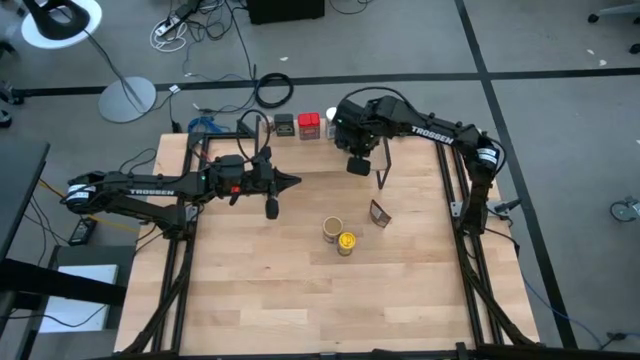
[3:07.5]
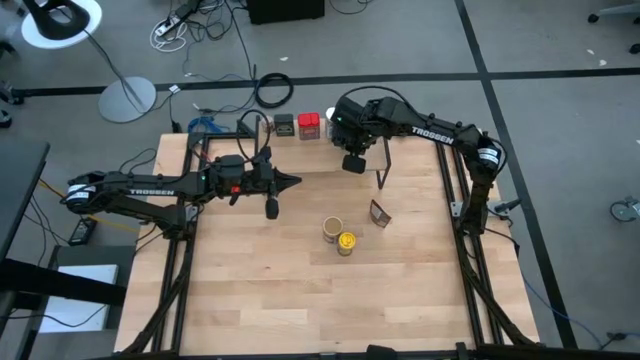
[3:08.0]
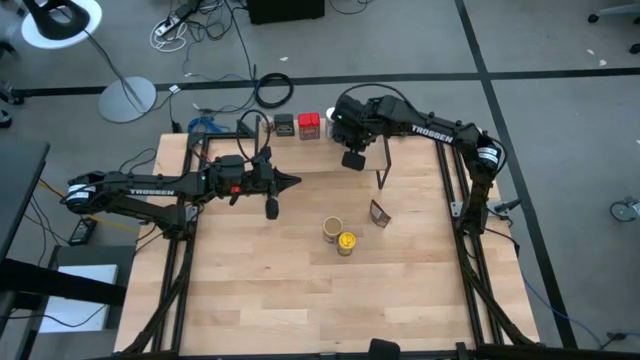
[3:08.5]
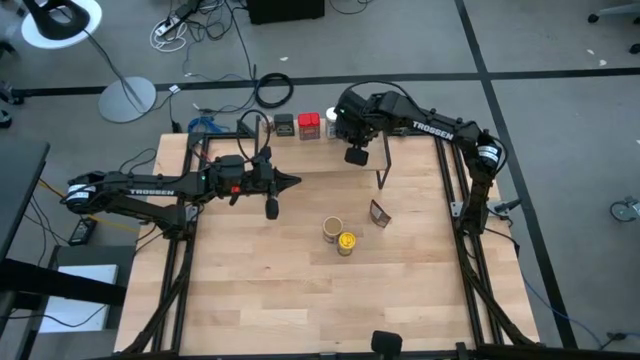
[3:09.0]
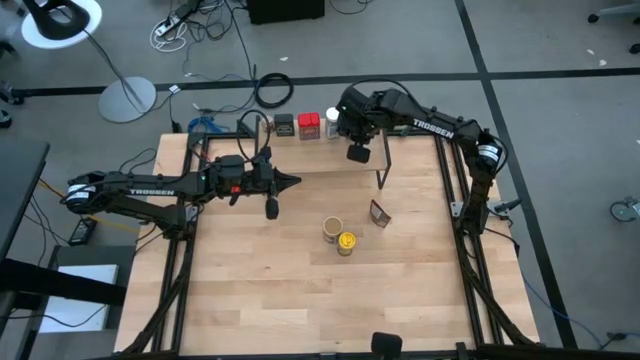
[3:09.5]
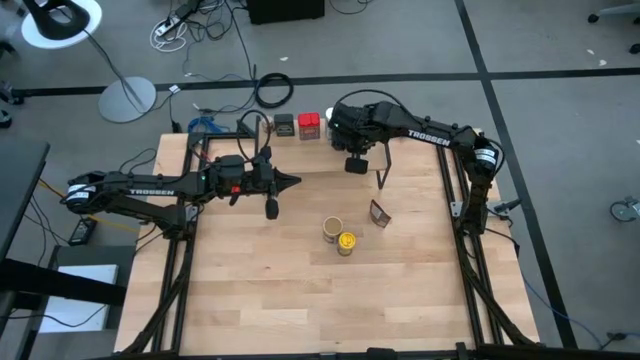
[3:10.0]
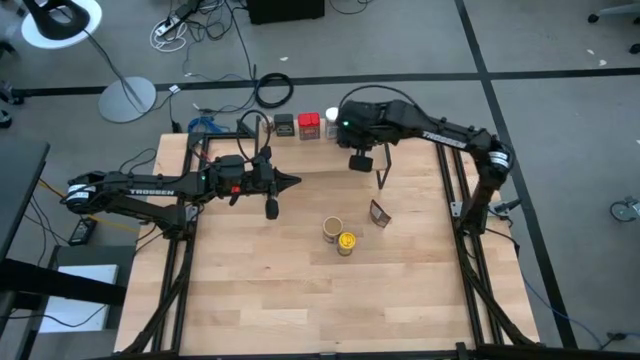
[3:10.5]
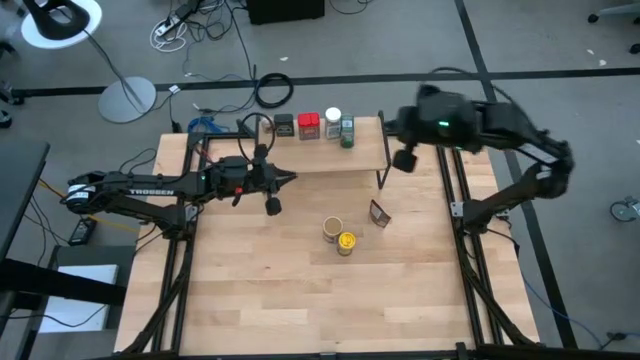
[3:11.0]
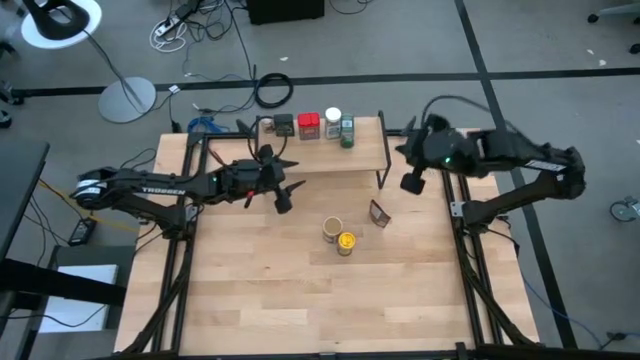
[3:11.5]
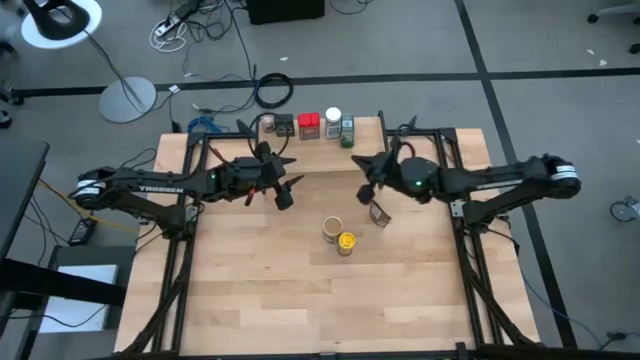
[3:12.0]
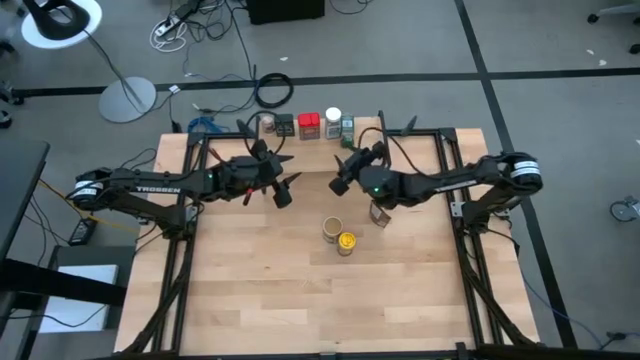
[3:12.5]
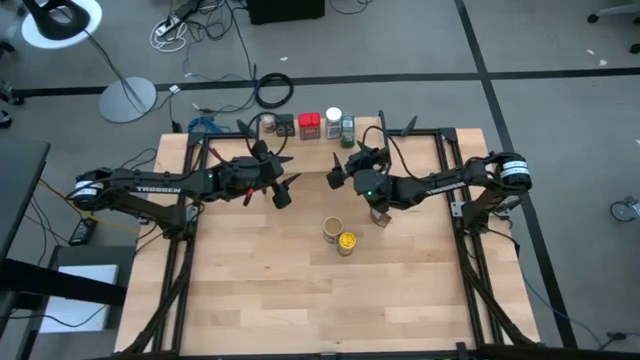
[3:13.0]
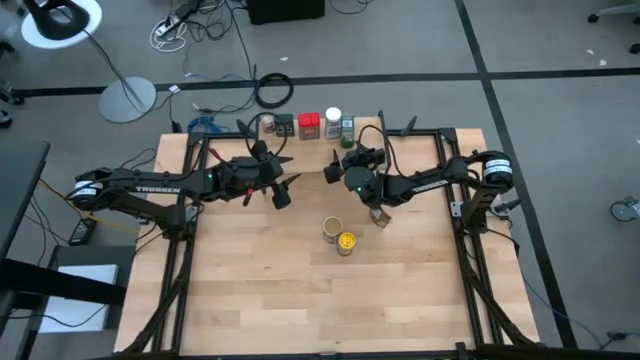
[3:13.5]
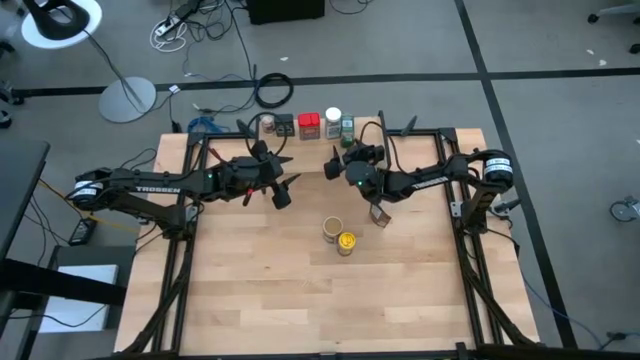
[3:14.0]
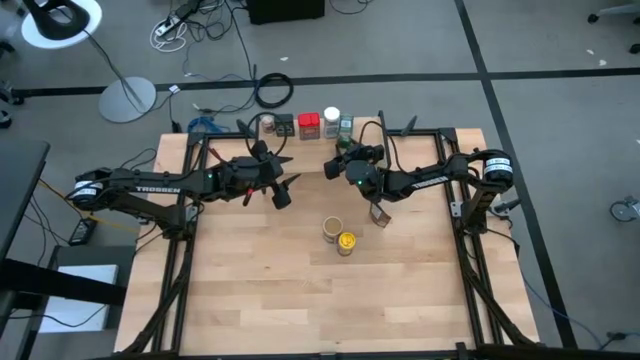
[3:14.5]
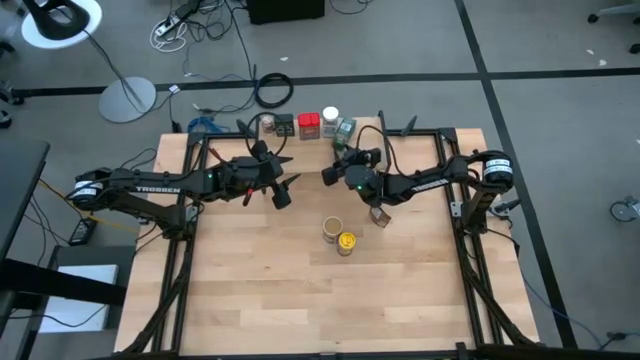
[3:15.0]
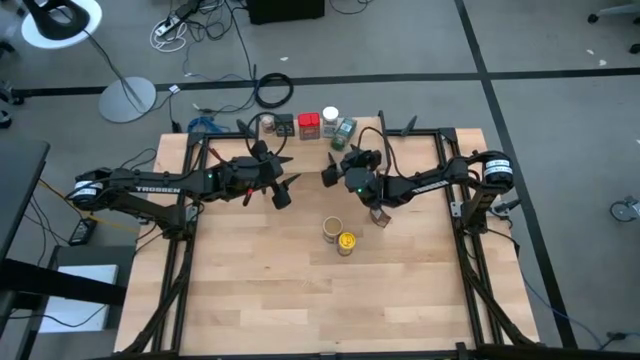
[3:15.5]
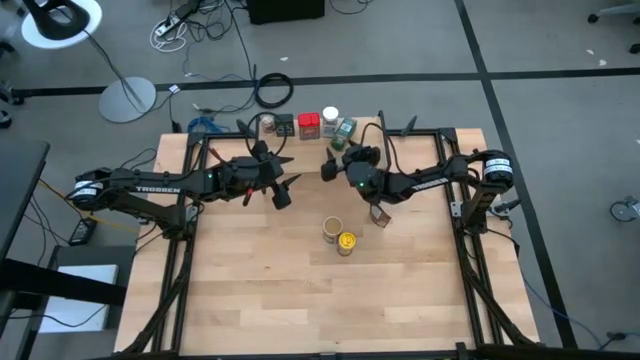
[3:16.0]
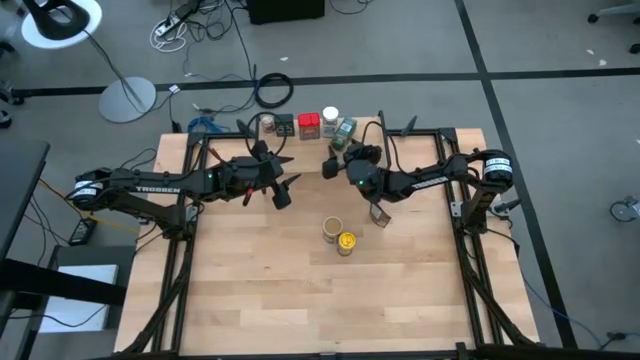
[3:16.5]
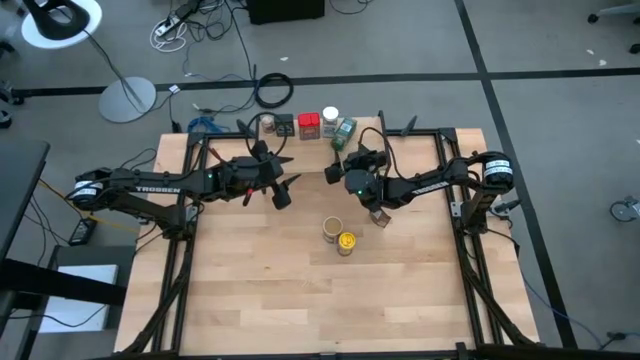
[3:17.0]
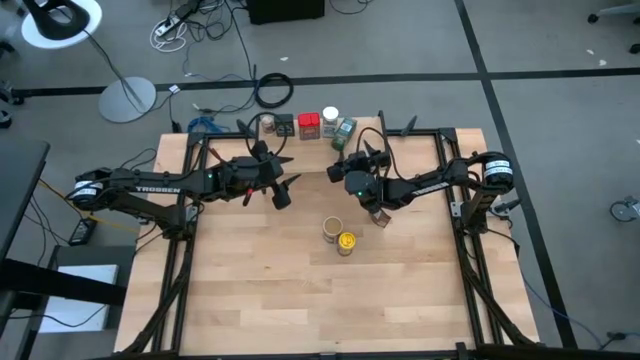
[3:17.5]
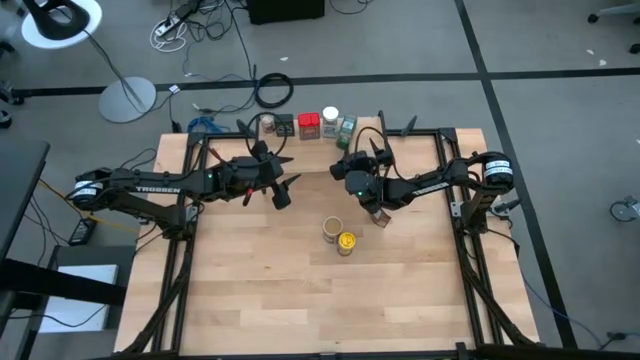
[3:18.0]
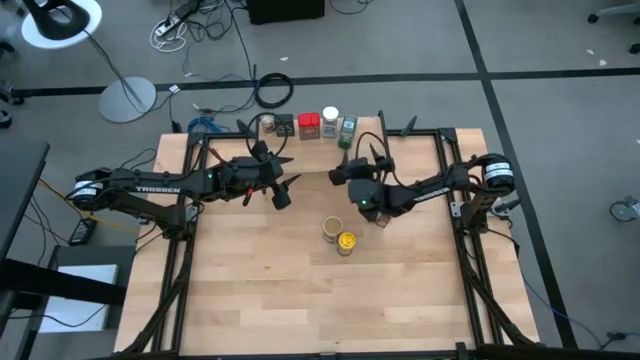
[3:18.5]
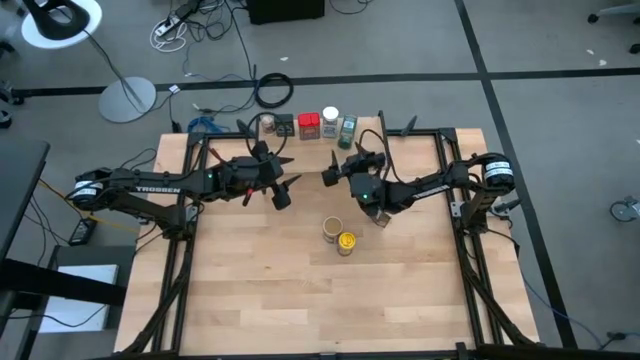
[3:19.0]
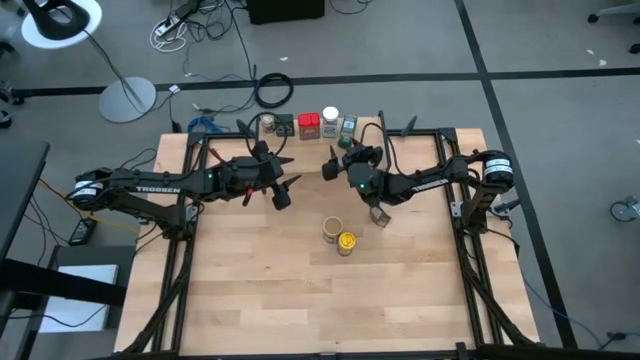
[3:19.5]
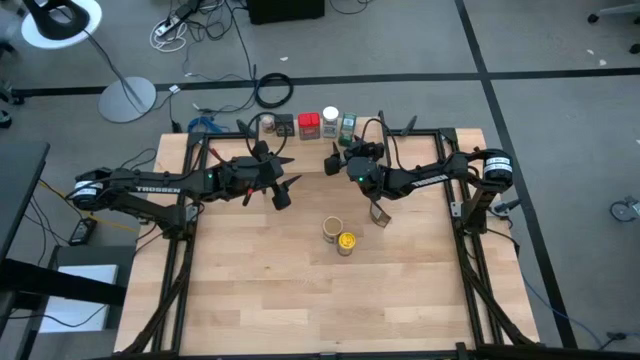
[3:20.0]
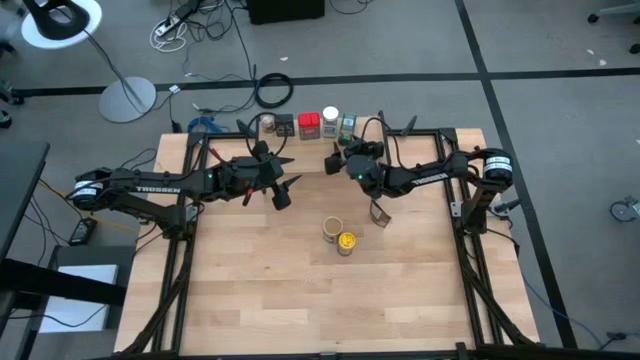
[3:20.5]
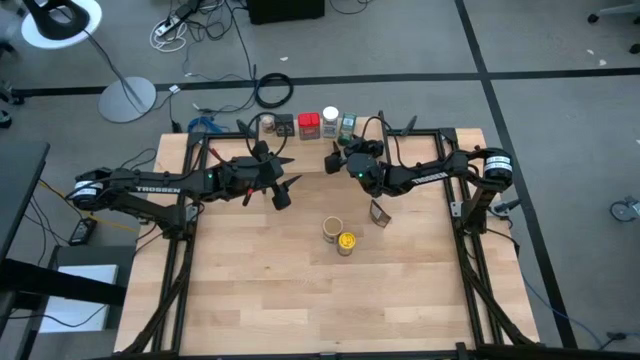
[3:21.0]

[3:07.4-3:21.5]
Task: Shelf spices
Put the green seasoning bottle on the shelf

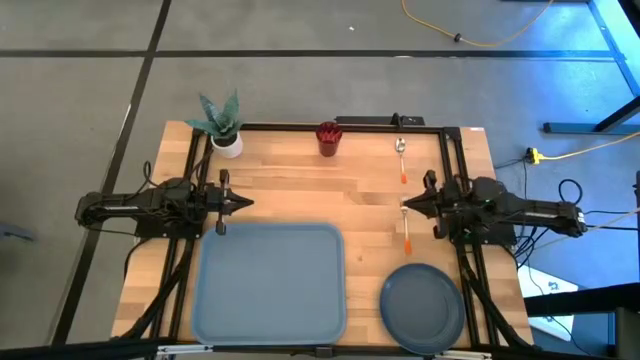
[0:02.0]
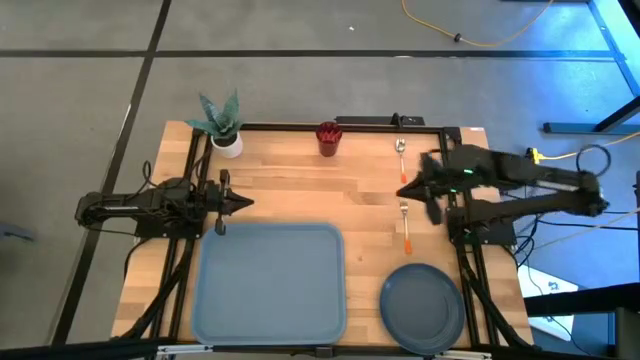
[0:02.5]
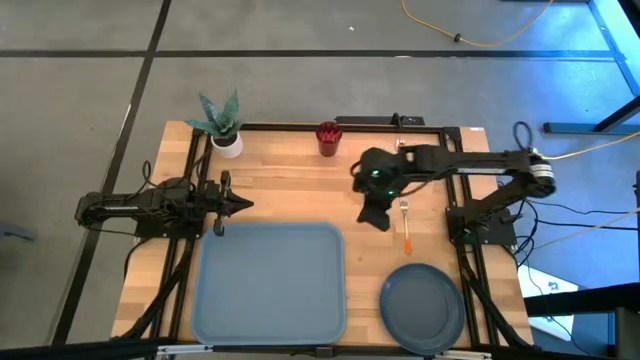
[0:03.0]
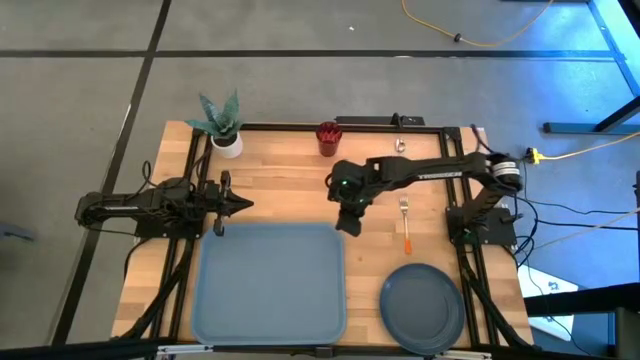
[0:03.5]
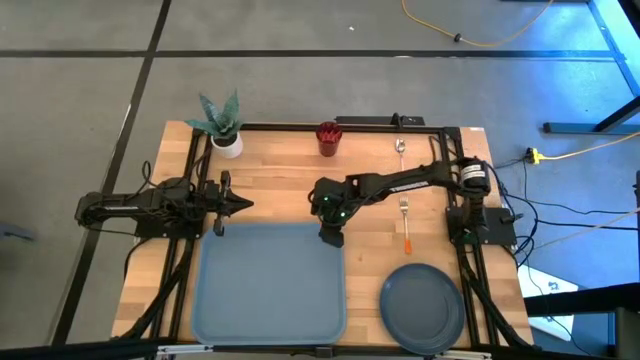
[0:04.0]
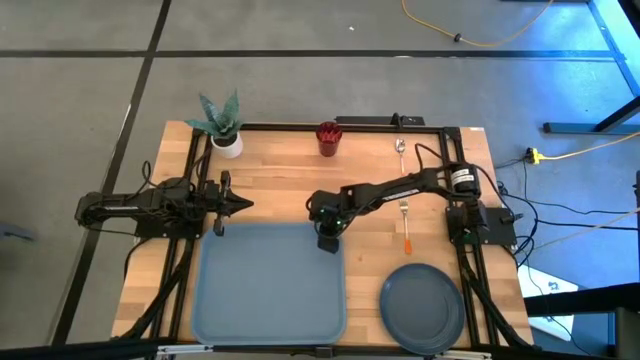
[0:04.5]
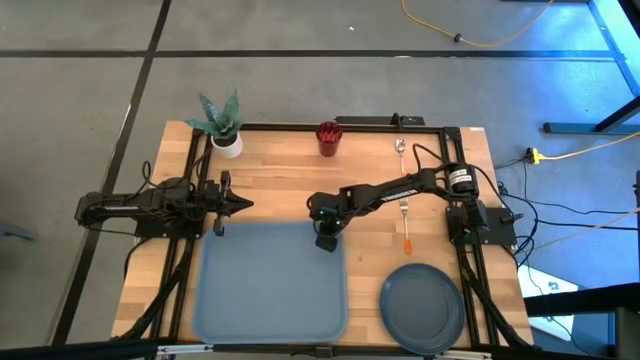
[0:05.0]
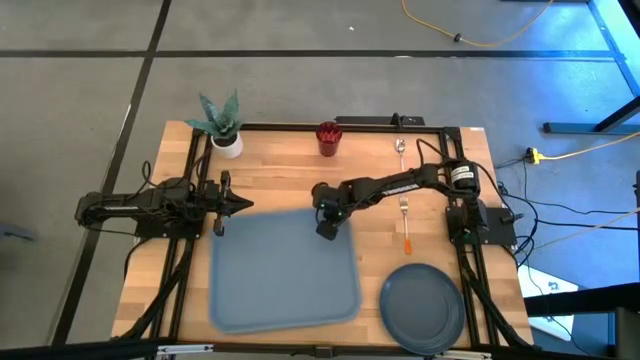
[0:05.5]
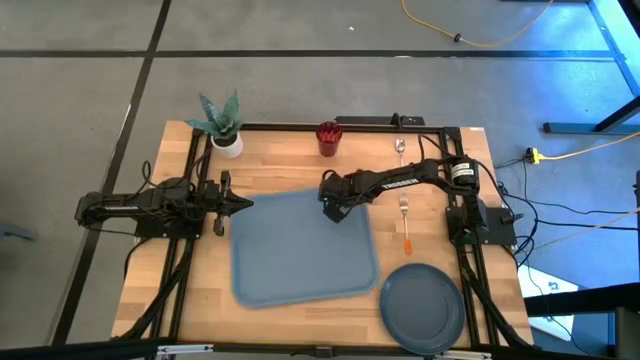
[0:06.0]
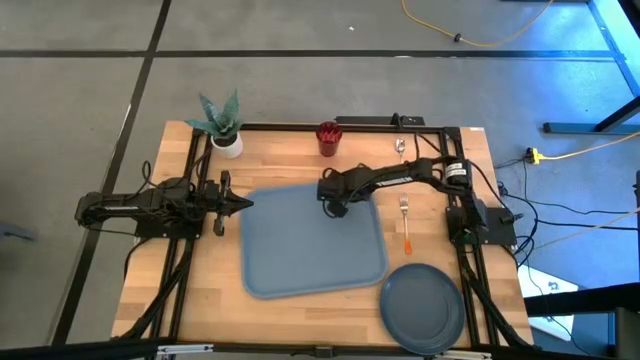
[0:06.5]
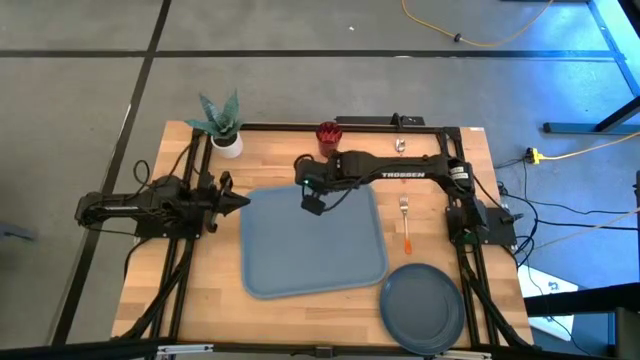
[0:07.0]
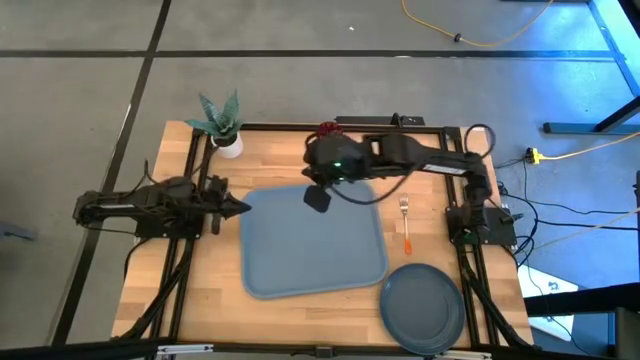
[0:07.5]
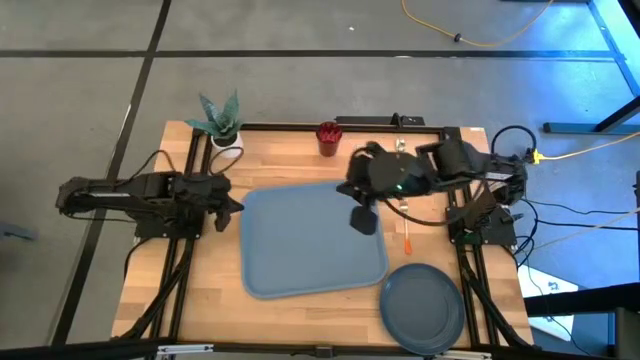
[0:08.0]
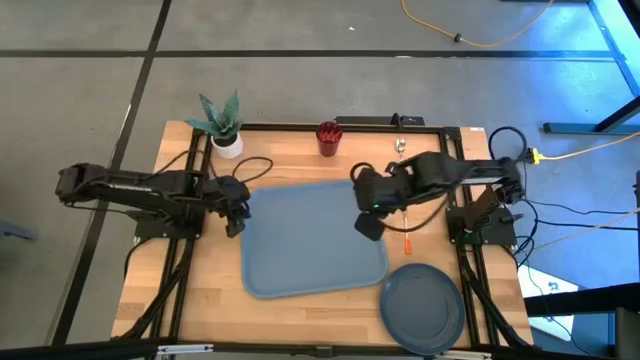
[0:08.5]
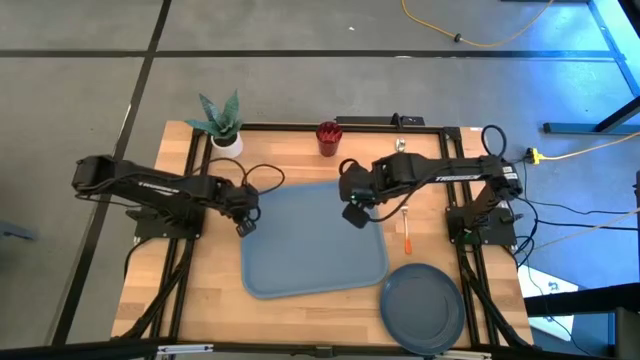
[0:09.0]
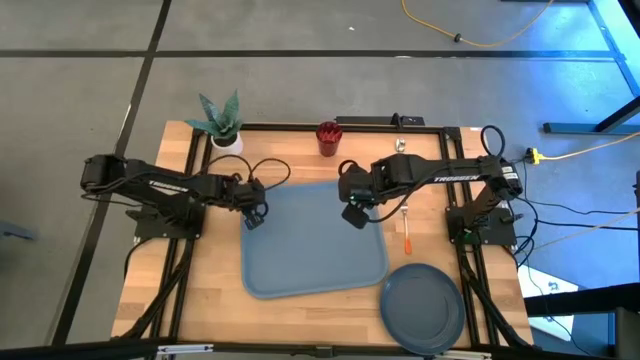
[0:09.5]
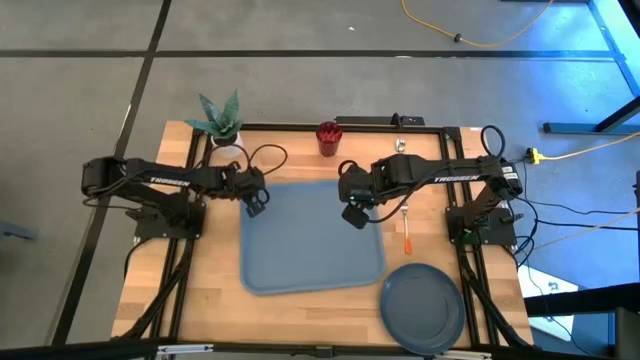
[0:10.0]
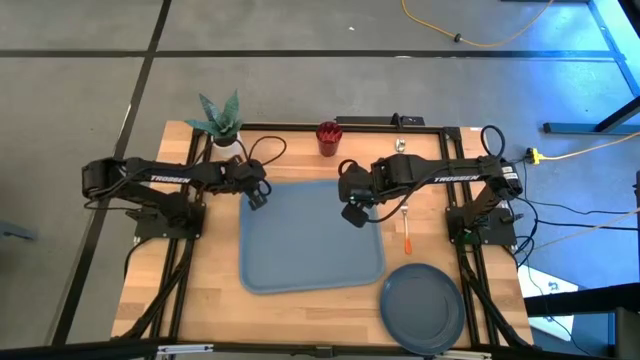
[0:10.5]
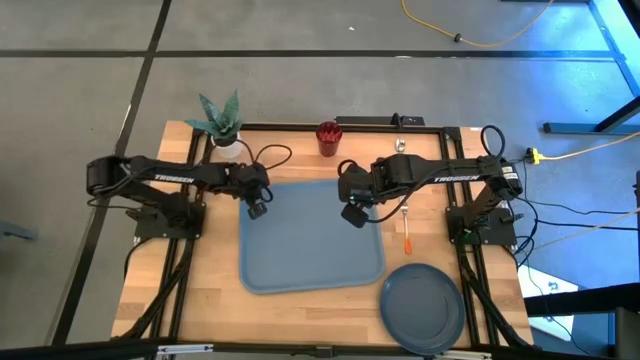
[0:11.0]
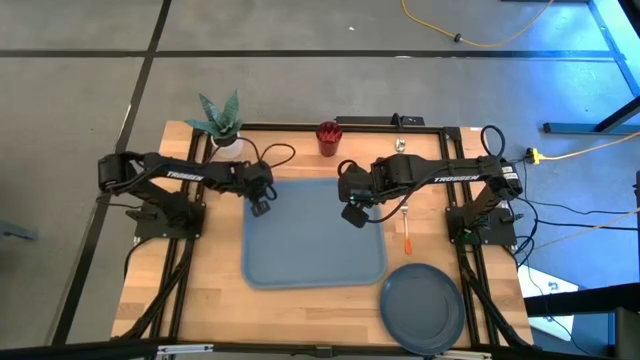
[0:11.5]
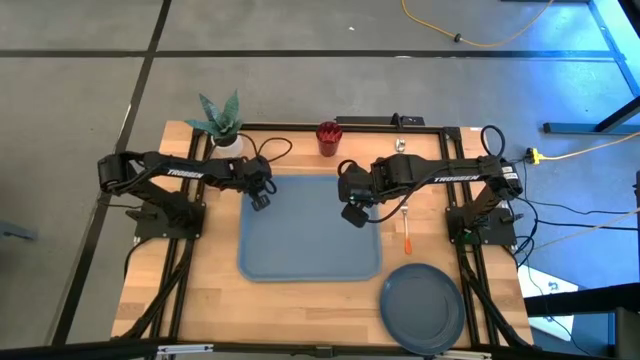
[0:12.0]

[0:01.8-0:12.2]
Task: Pick and place plate/cup/fork/spoon on tray
Move the blue tray to the center of the table
